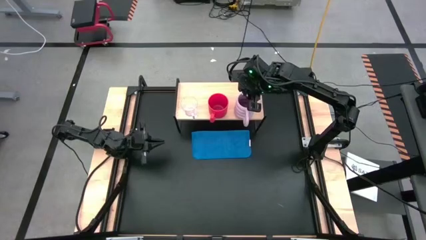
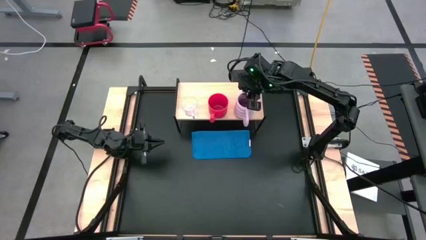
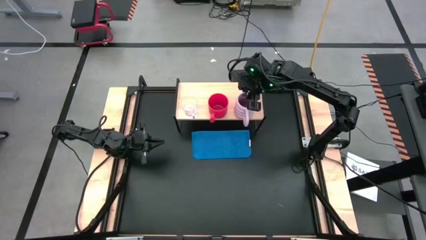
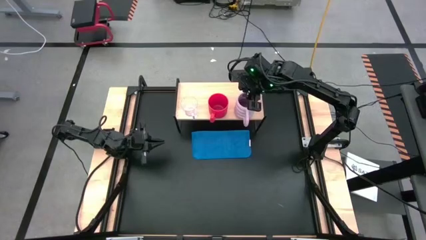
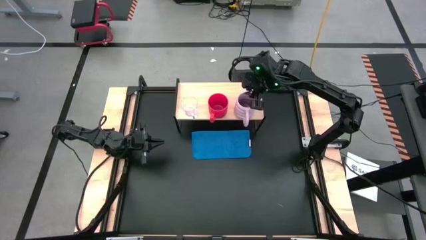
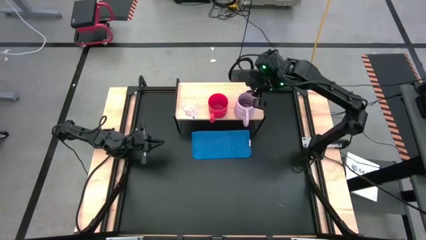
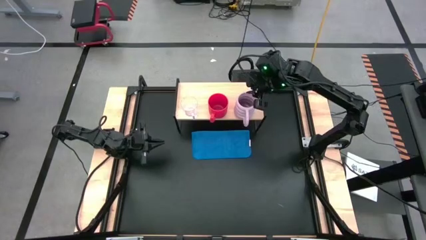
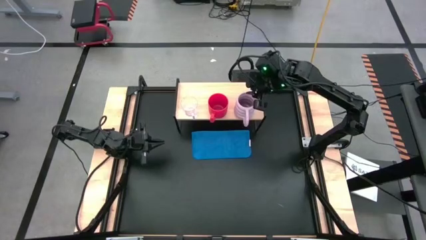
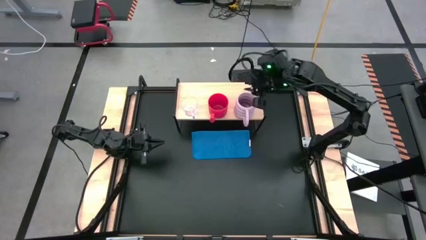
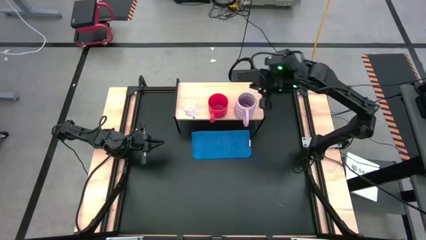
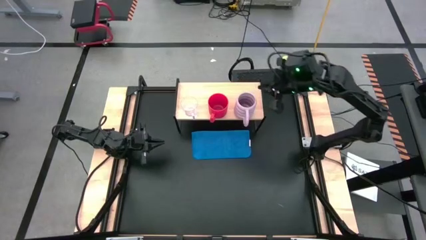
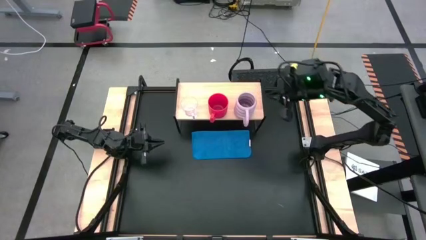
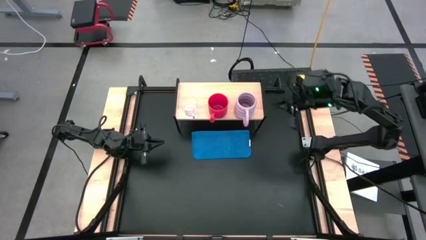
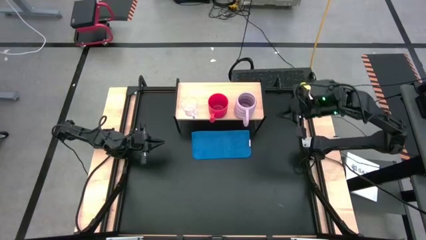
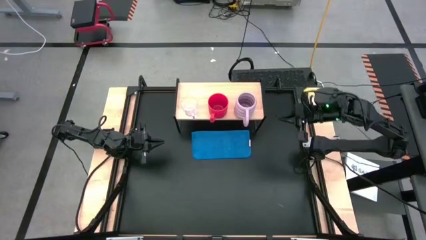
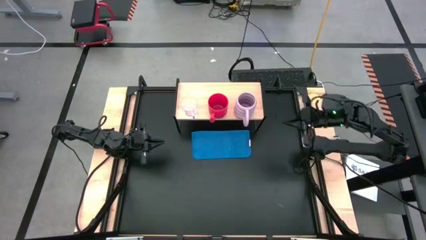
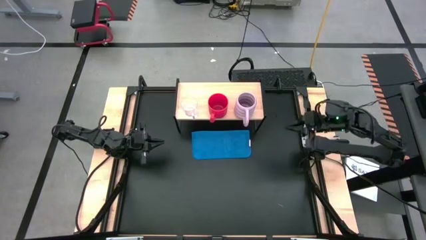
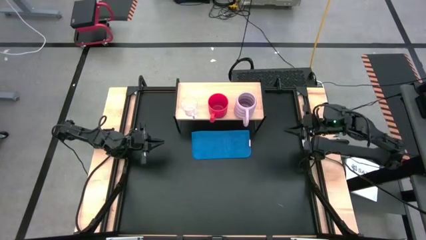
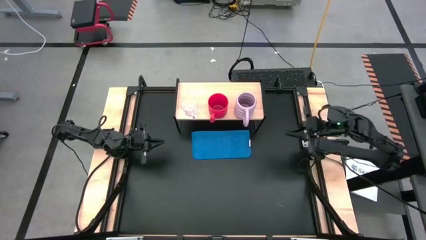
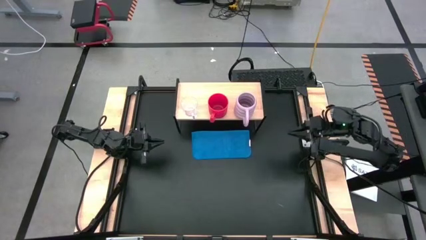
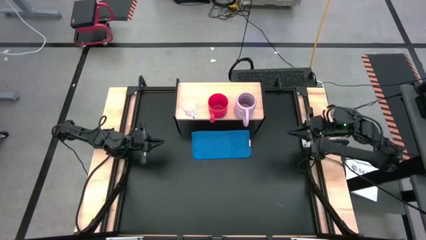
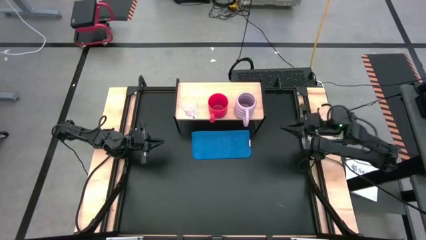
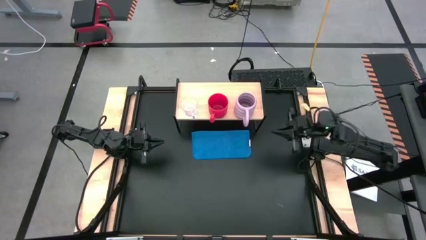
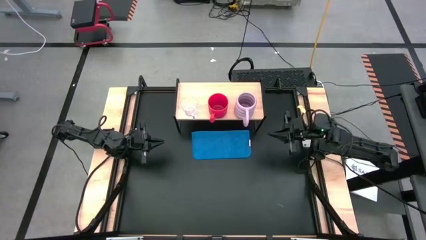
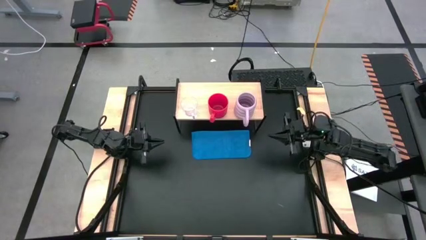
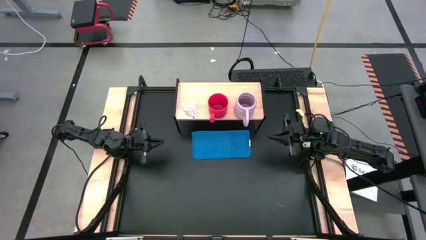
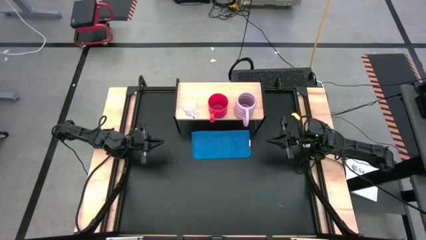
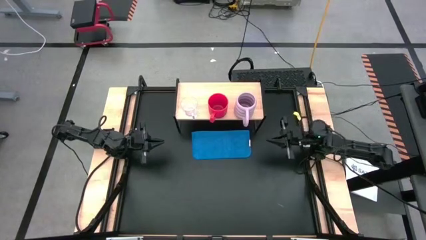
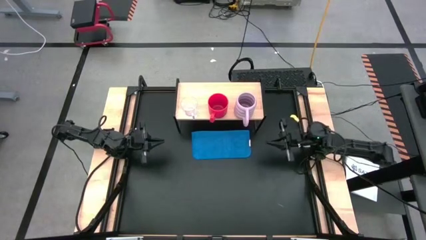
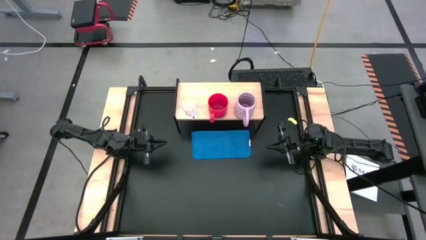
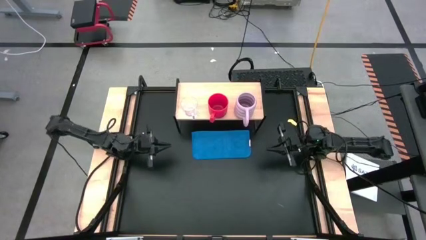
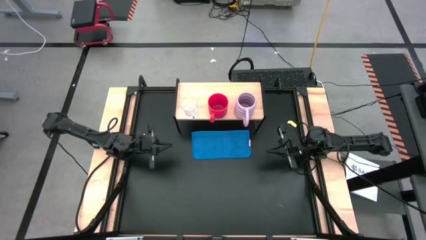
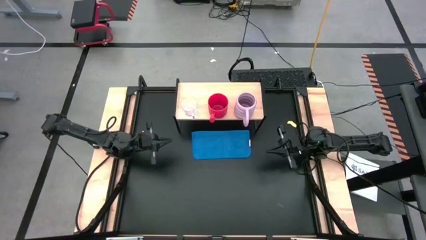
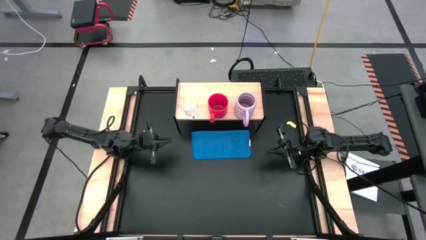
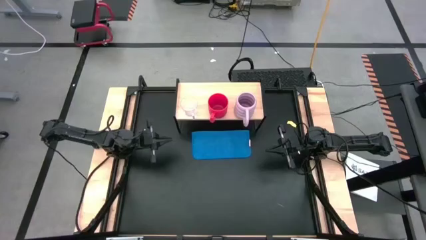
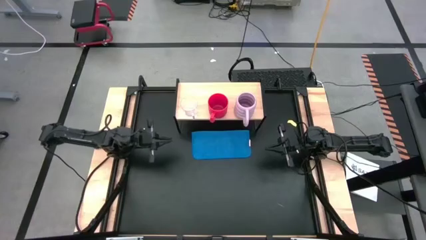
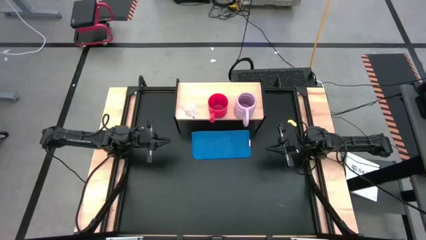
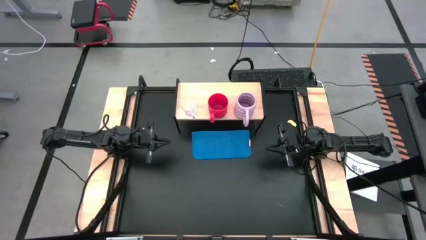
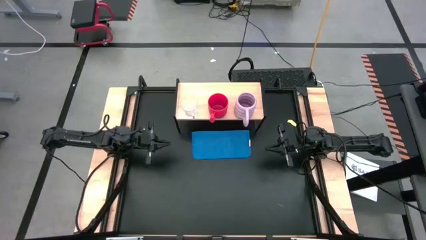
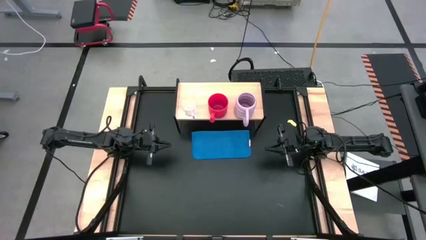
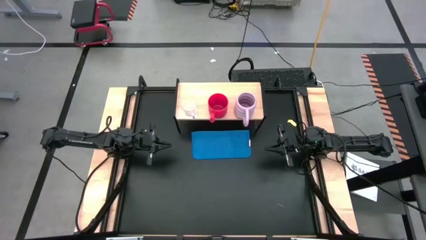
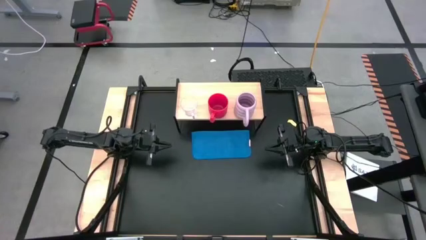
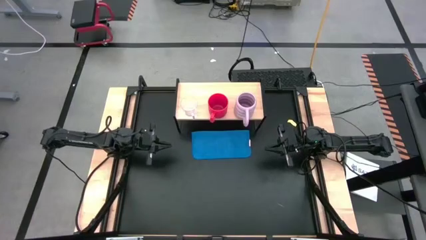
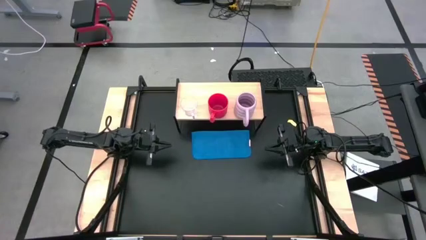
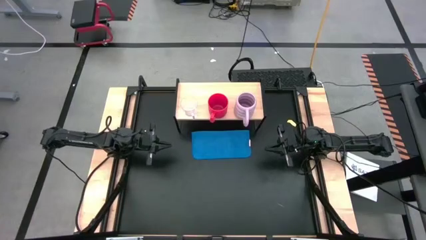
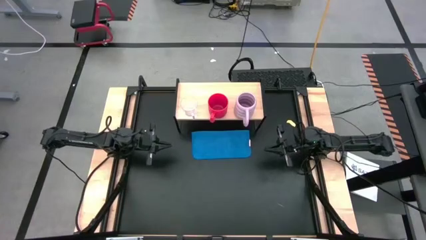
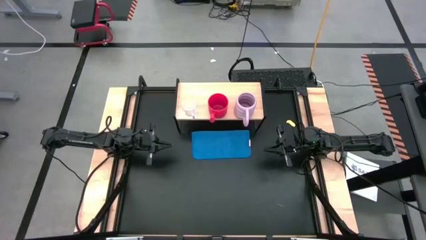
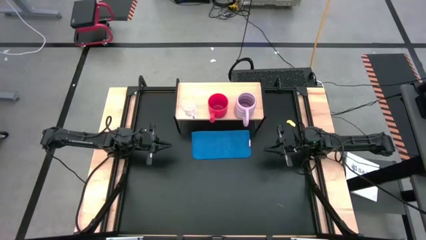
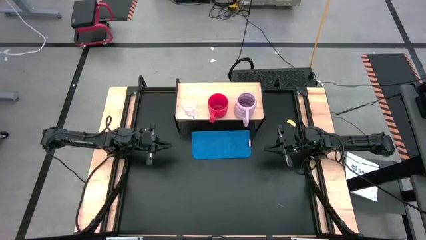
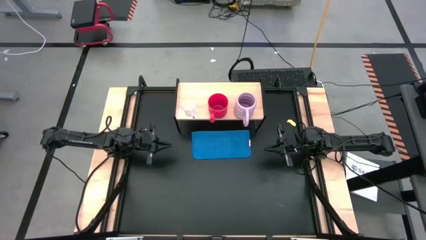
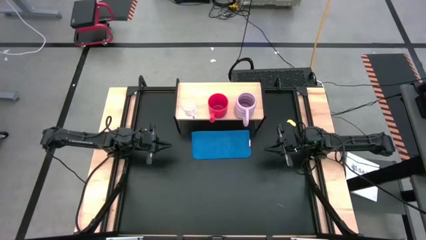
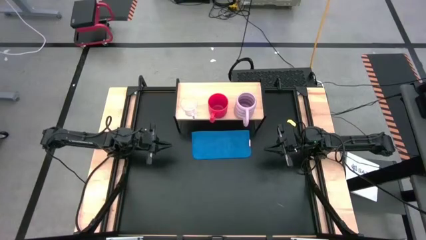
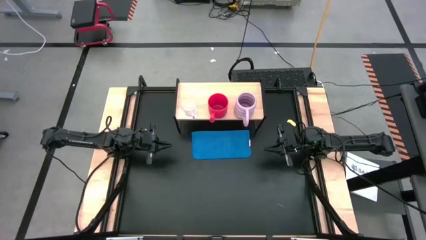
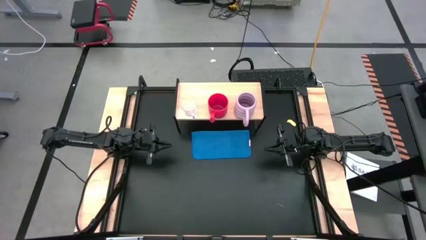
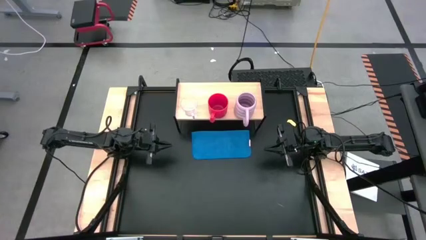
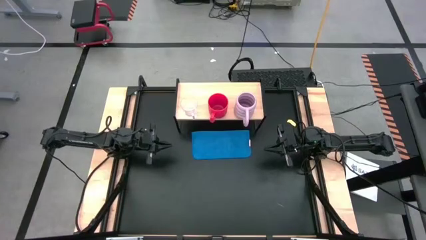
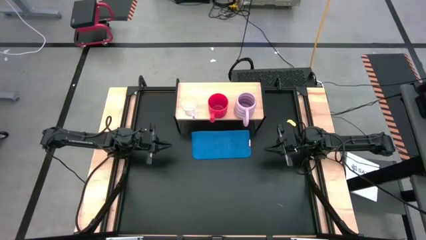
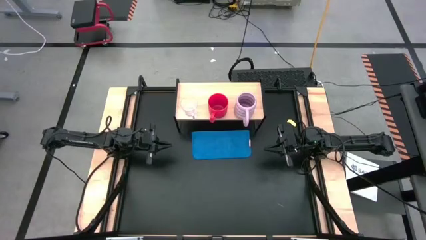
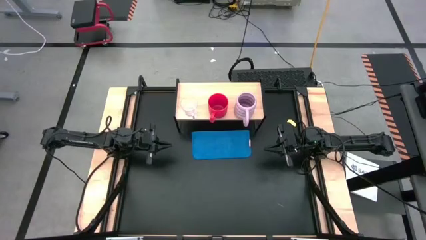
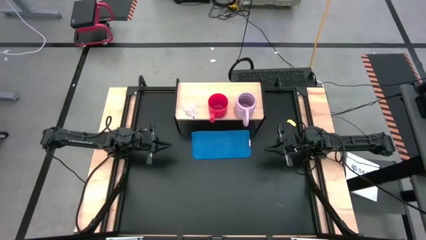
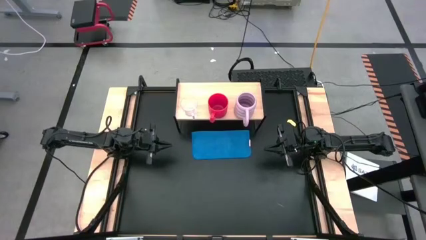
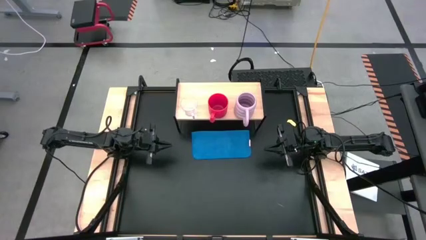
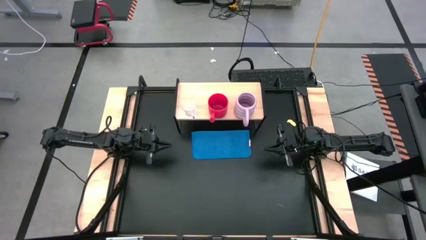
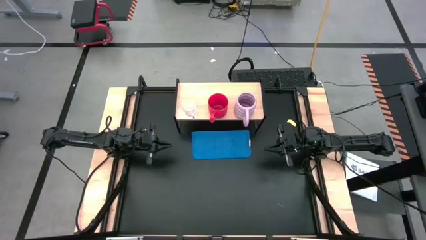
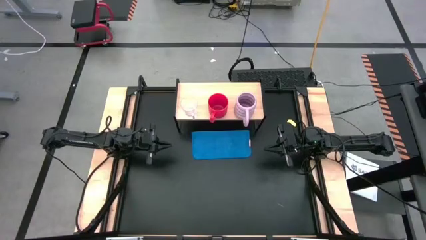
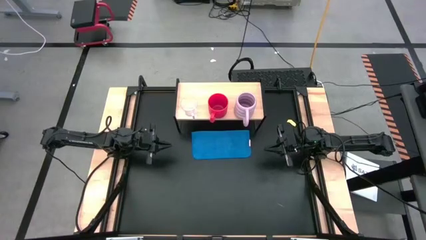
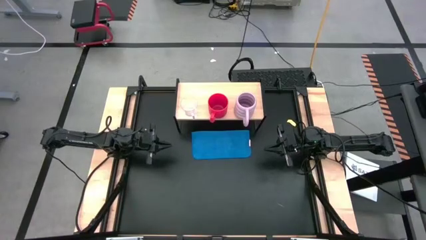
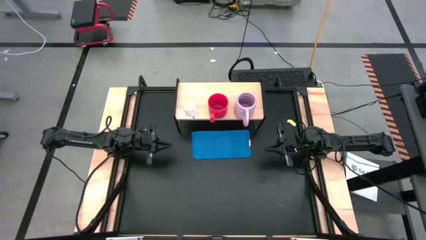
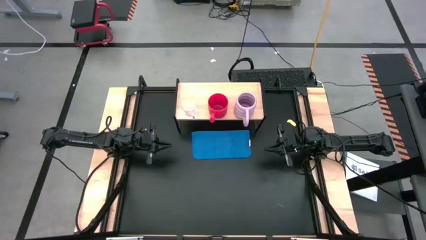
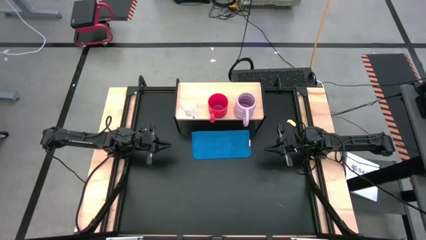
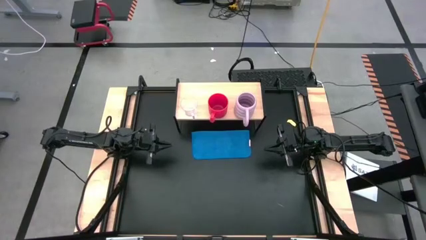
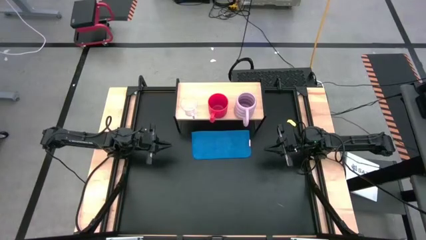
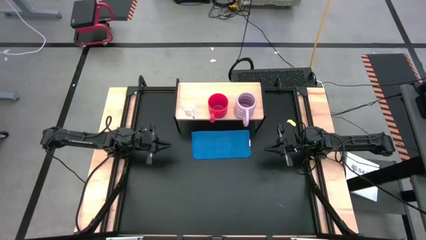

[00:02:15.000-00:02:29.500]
Task: Stack small to large cups/mugs on shelf
Return to Home Position

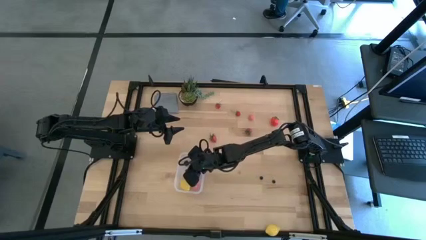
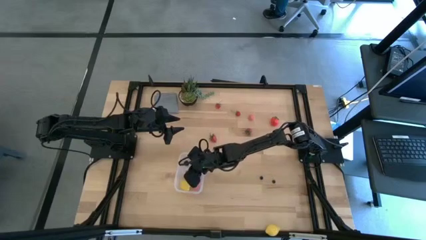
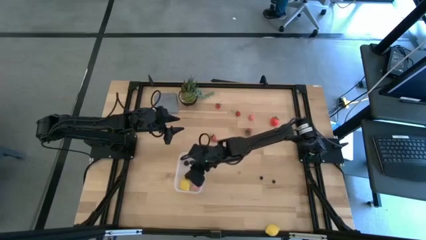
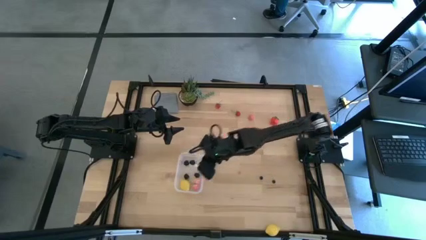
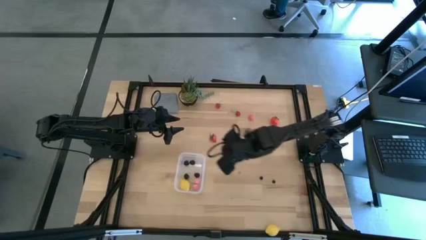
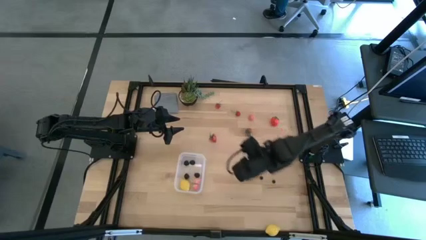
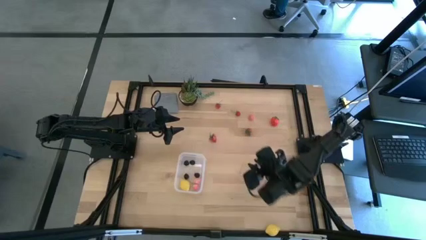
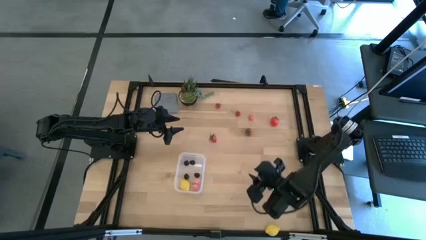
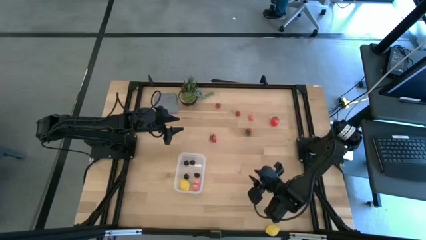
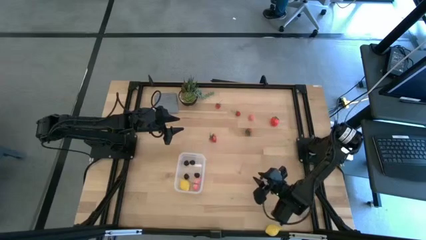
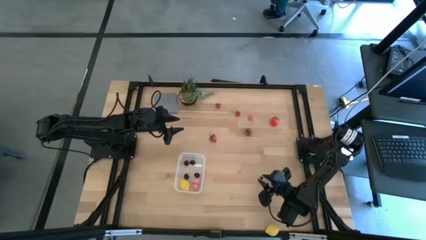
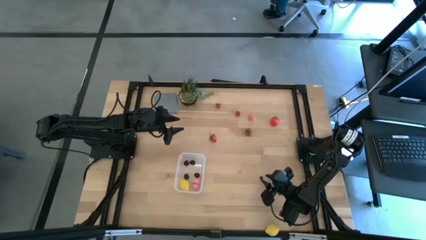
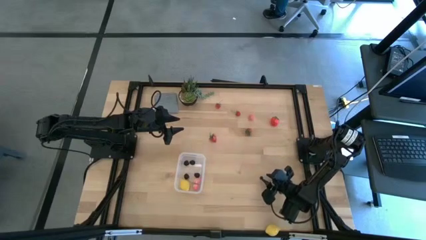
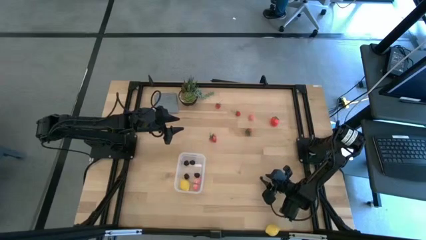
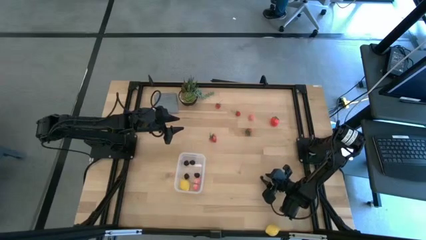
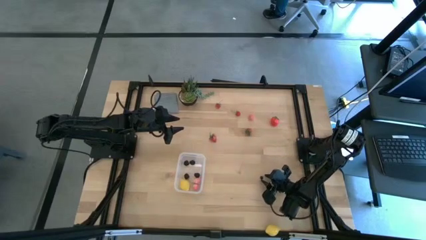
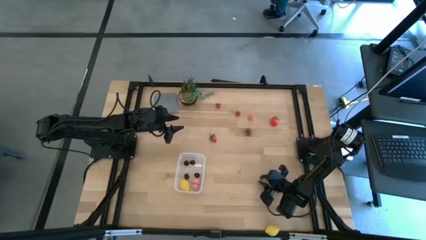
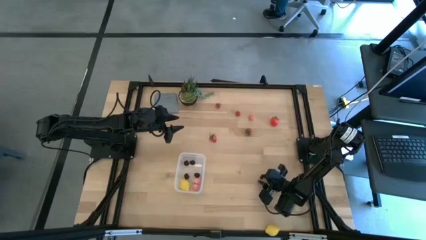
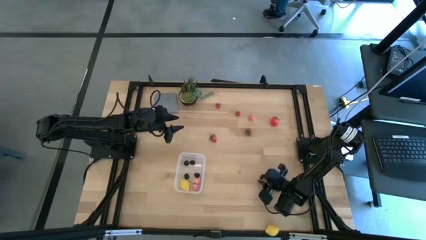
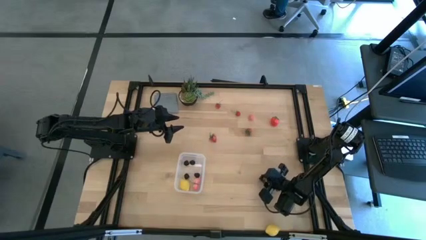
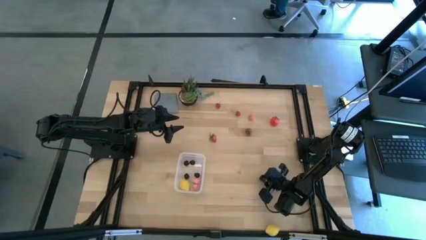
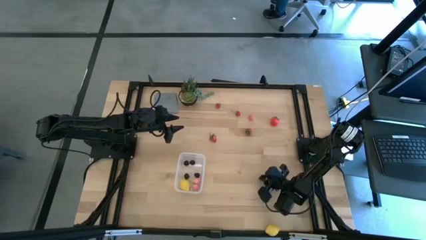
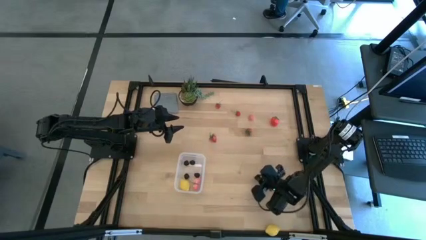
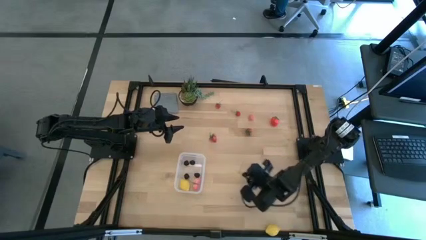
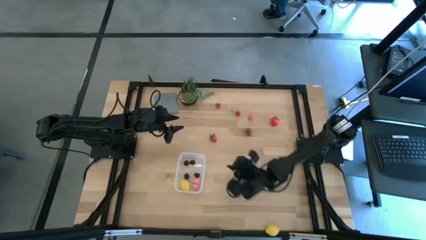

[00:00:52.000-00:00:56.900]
Task: Pick and placing Produce into tupperware
Put the blueberry into the transparent bin
